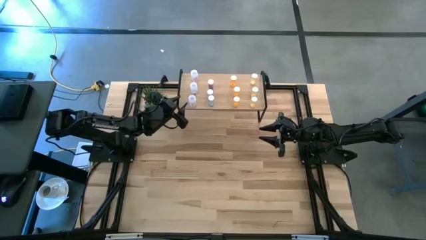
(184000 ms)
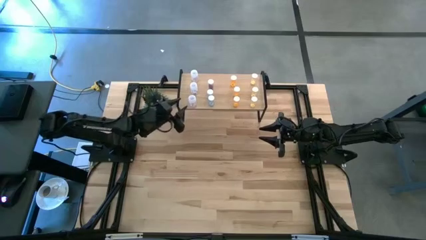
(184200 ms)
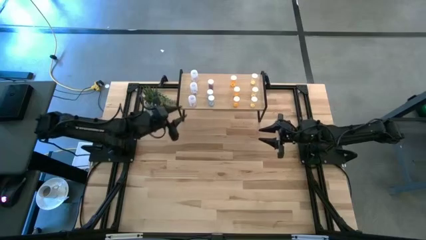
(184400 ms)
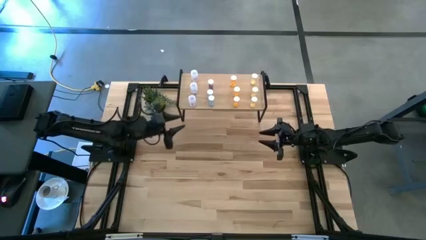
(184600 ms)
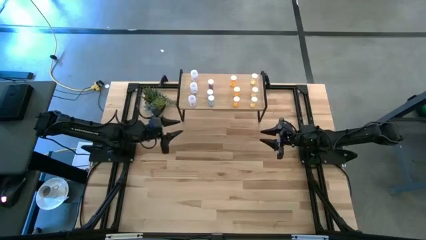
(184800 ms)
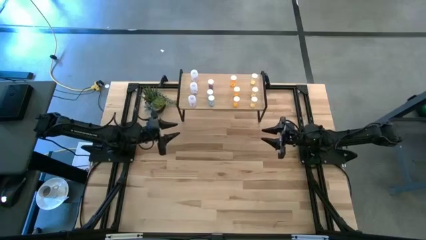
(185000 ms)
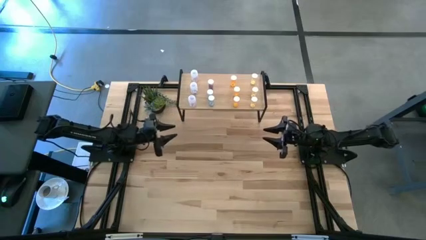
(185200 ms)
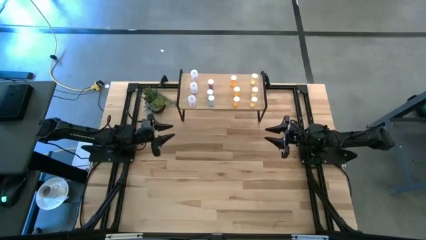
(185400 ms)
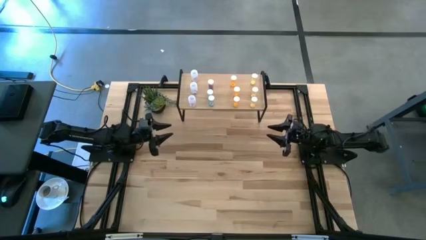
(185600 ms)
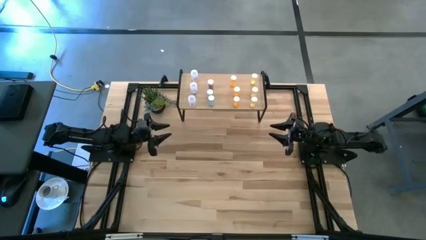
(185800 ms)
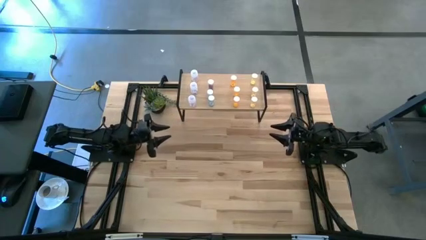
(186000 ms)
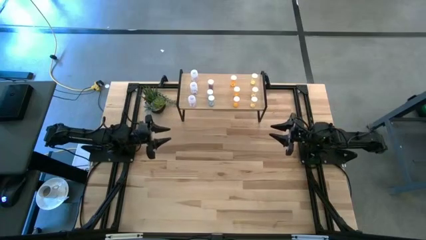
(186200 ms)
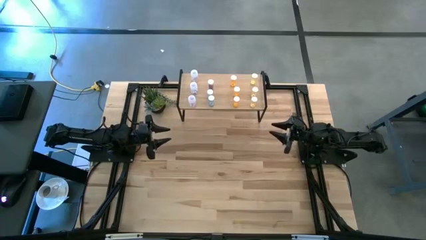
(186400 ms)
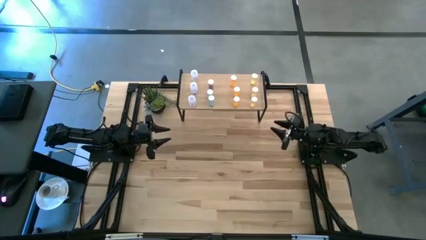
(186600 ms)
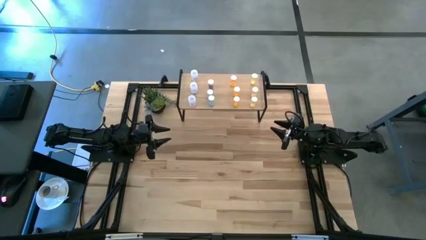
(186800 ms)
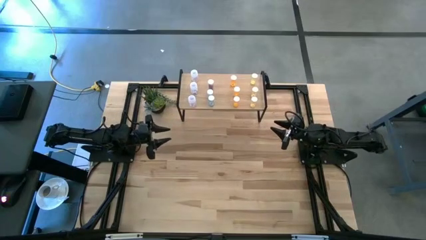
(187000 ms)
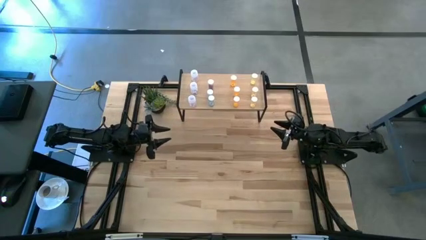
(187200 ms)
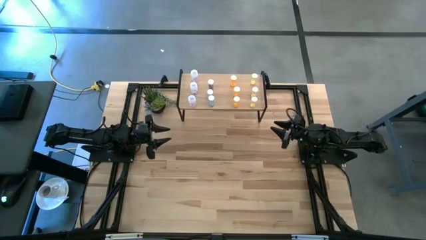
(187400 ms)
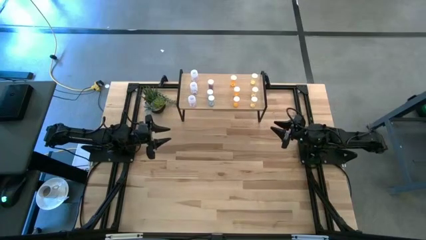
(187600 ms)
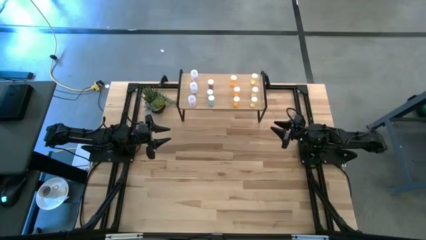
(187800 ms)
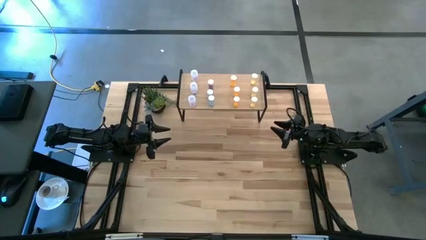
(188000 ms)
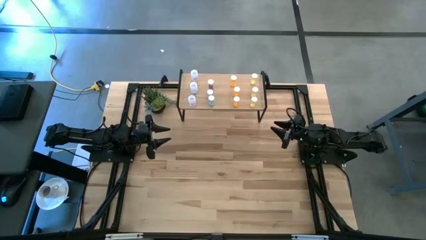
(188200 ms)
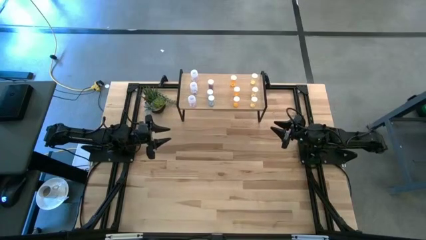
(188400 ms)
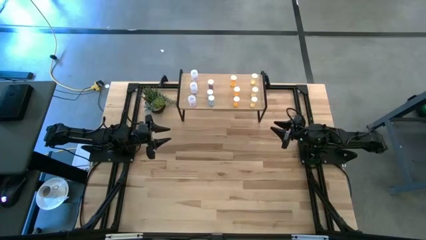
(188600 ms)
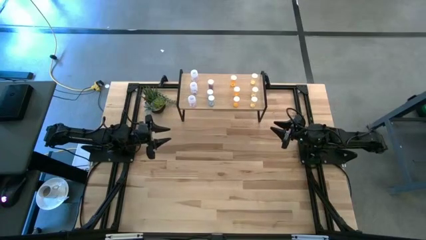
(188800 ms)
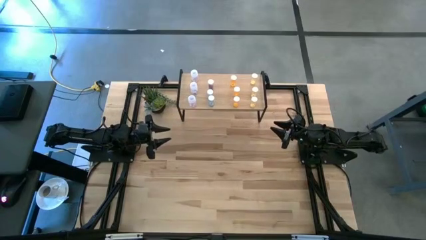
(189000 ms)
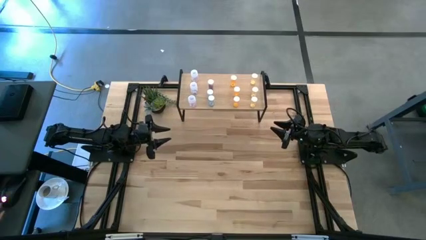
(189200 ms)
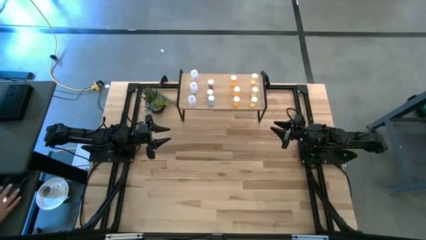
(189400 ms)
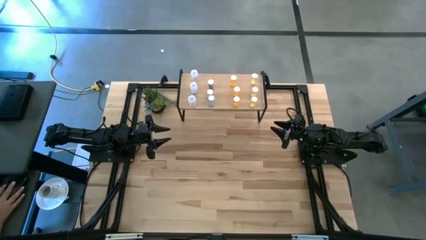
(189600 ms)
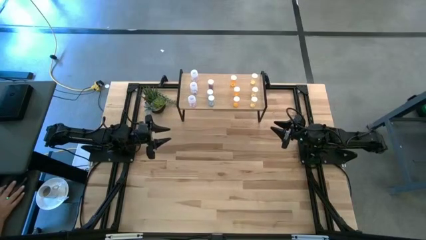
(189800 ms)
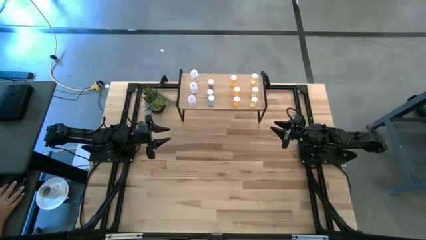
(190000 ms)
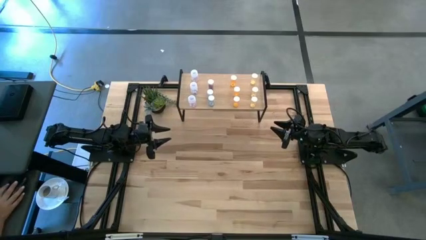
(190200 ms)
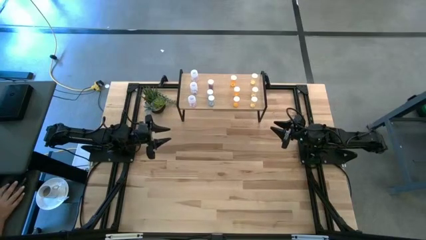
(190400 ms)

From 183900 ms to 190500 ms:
Task: Pick and place medicine bottles onto shelf by color
Return to Home Position

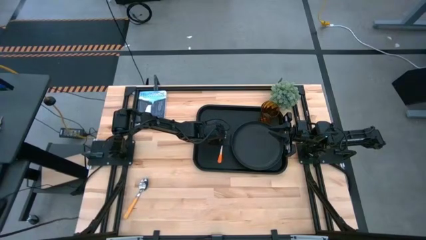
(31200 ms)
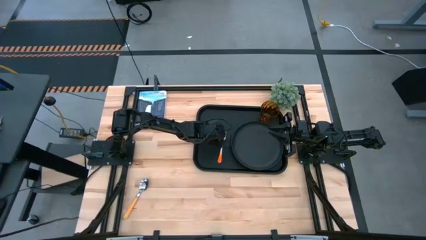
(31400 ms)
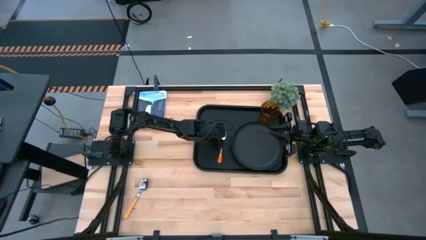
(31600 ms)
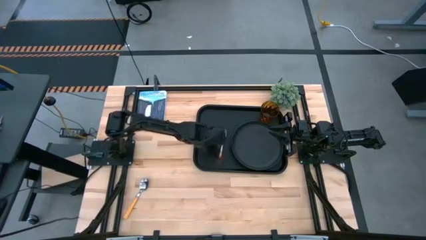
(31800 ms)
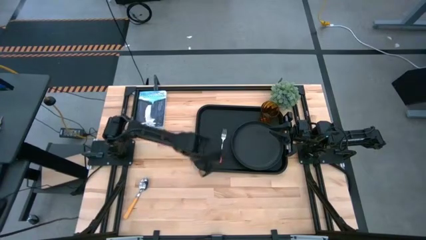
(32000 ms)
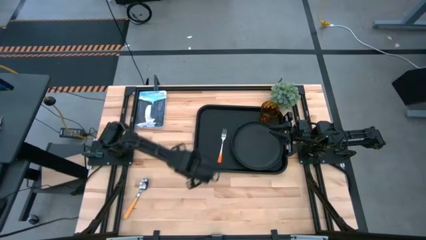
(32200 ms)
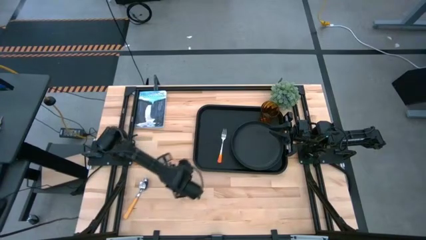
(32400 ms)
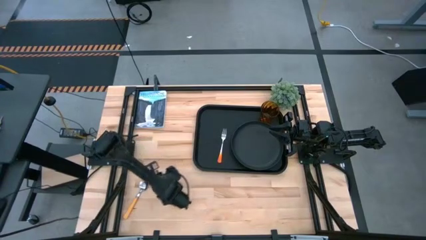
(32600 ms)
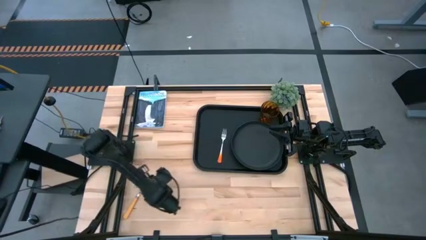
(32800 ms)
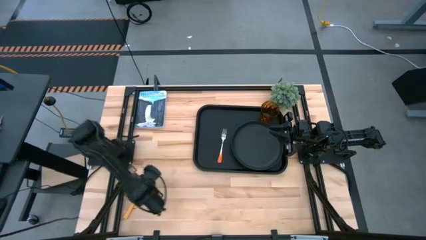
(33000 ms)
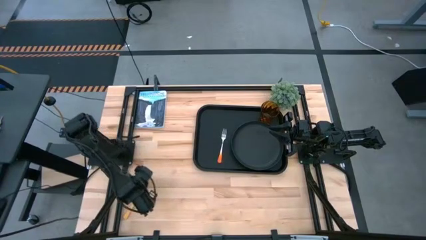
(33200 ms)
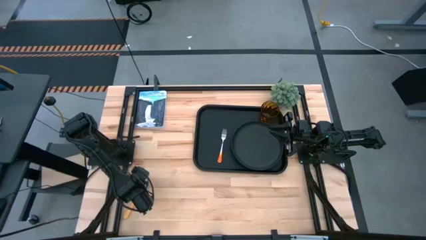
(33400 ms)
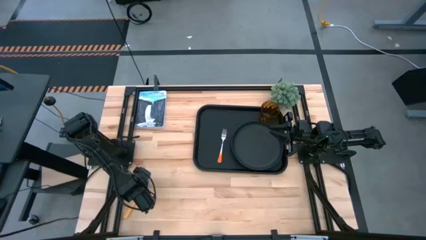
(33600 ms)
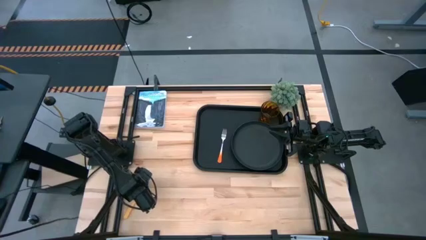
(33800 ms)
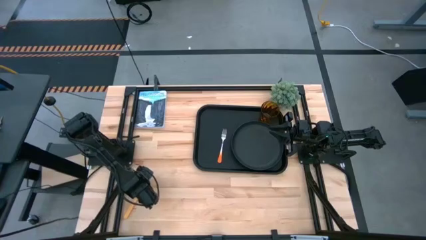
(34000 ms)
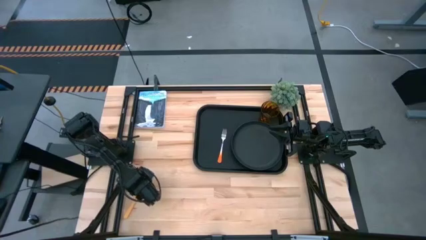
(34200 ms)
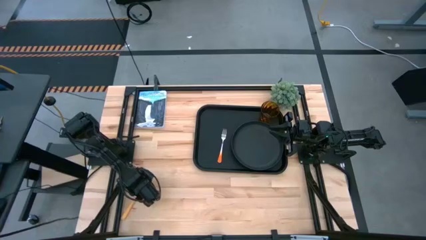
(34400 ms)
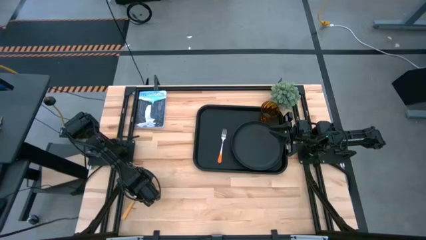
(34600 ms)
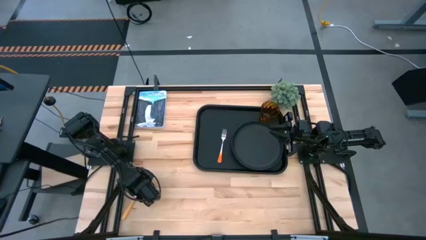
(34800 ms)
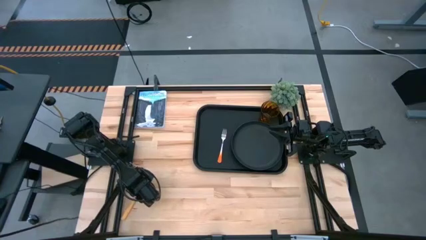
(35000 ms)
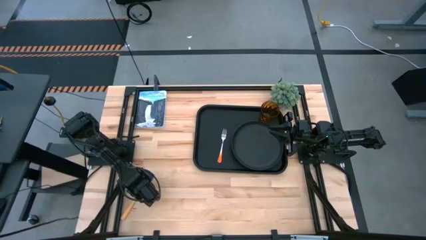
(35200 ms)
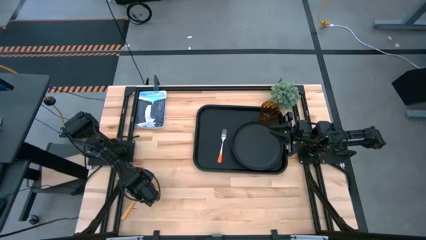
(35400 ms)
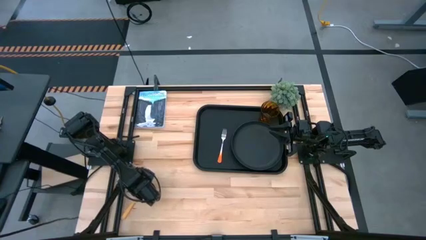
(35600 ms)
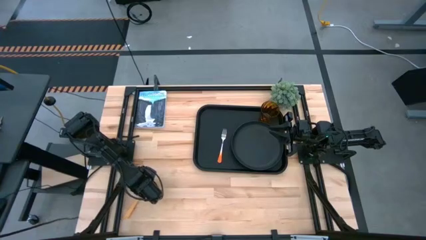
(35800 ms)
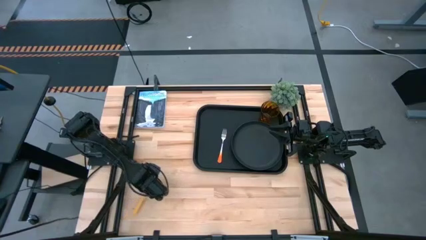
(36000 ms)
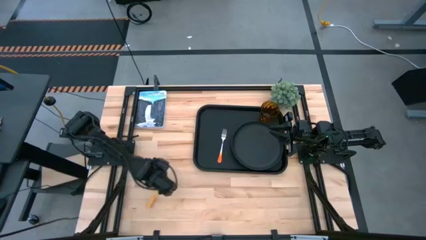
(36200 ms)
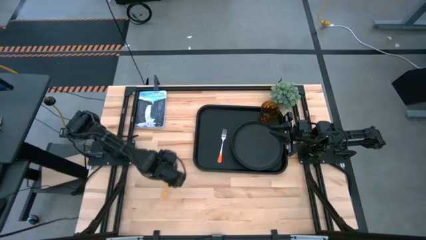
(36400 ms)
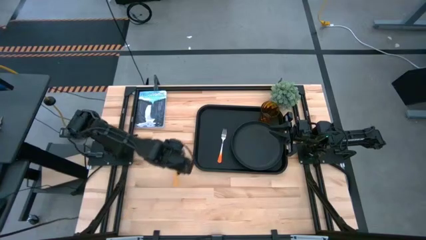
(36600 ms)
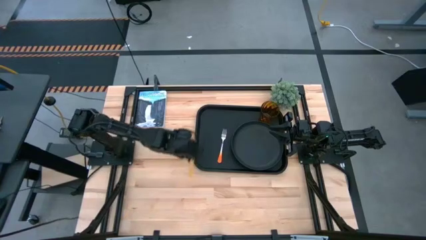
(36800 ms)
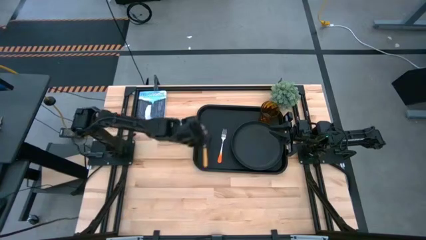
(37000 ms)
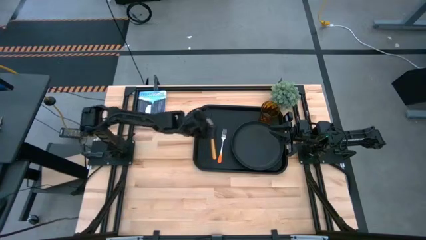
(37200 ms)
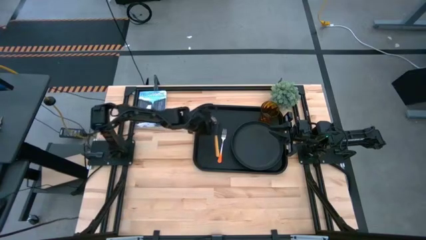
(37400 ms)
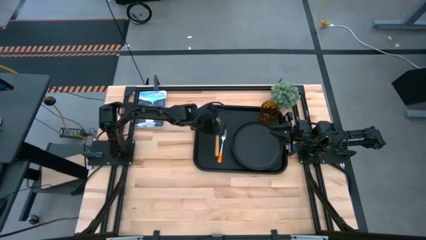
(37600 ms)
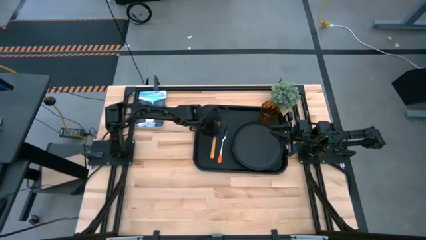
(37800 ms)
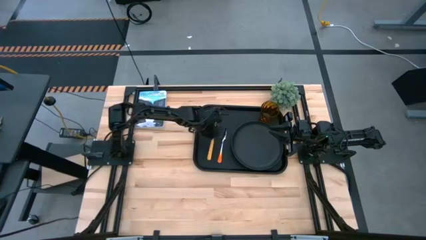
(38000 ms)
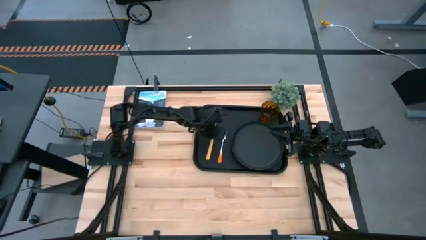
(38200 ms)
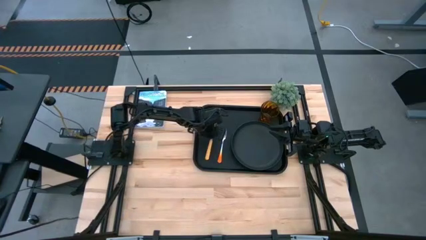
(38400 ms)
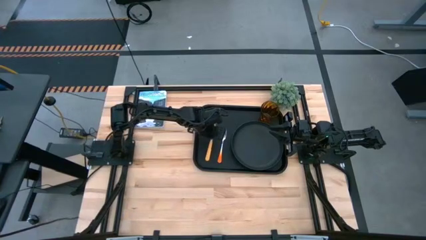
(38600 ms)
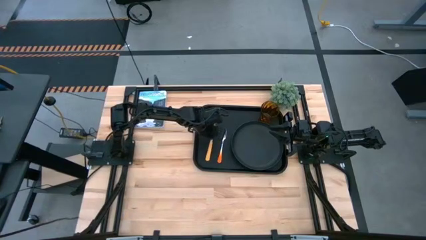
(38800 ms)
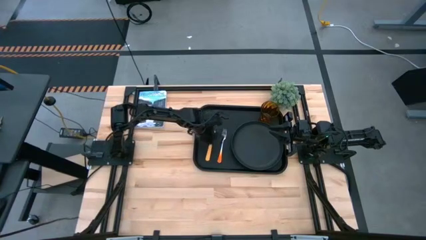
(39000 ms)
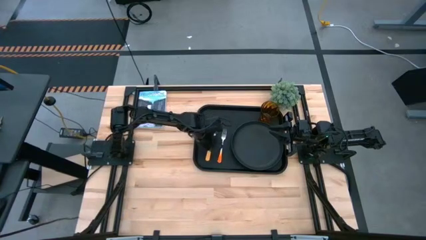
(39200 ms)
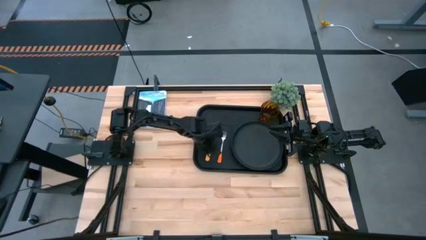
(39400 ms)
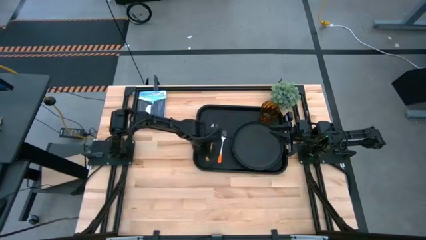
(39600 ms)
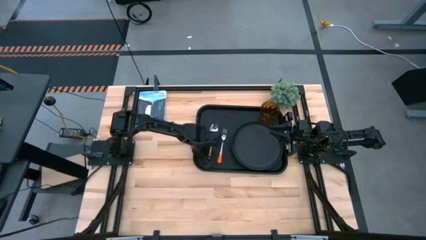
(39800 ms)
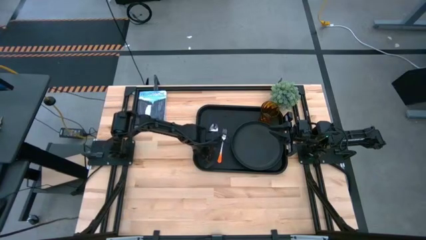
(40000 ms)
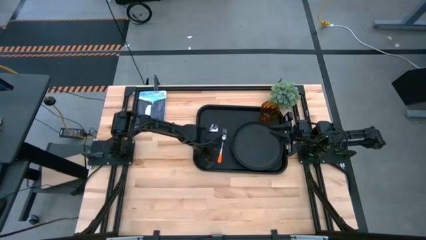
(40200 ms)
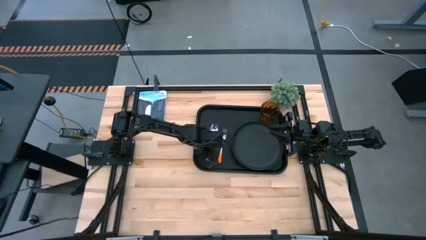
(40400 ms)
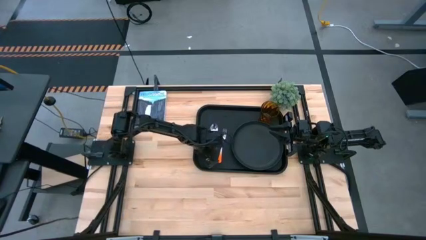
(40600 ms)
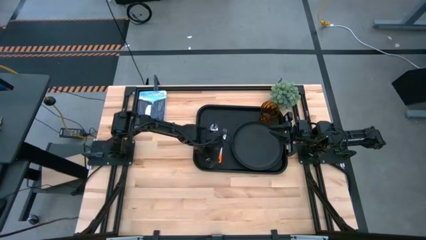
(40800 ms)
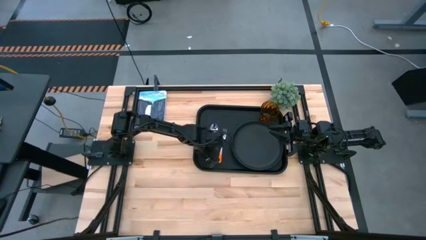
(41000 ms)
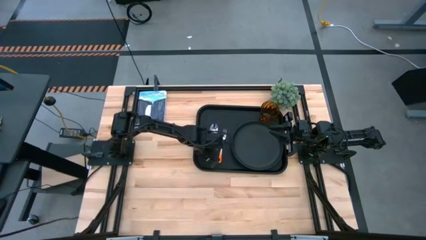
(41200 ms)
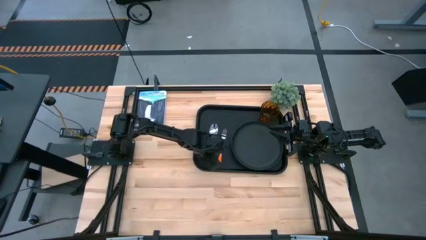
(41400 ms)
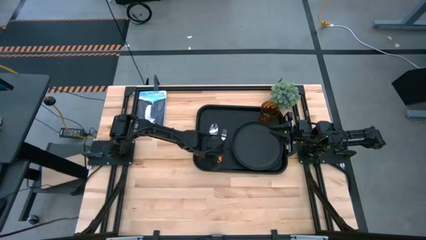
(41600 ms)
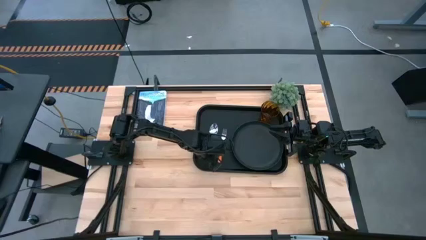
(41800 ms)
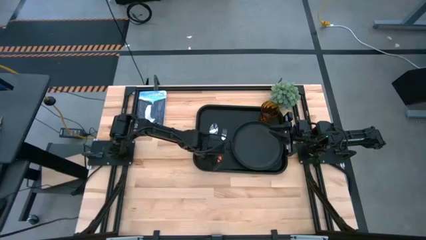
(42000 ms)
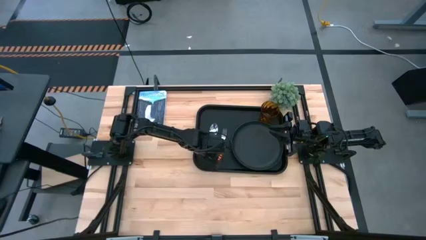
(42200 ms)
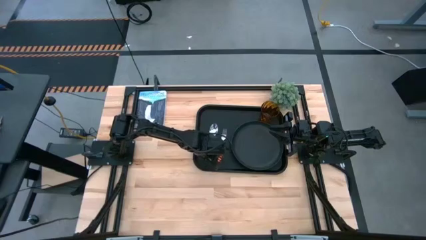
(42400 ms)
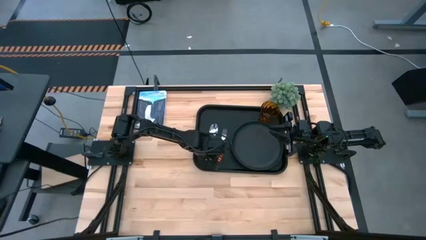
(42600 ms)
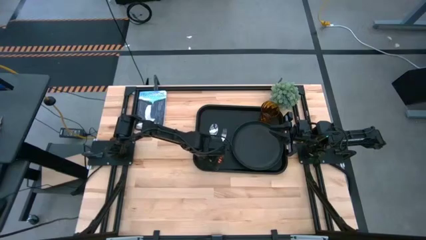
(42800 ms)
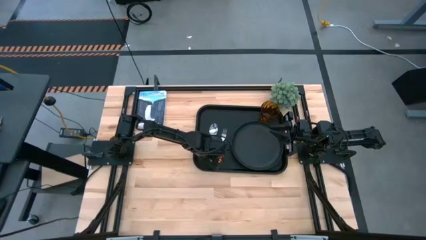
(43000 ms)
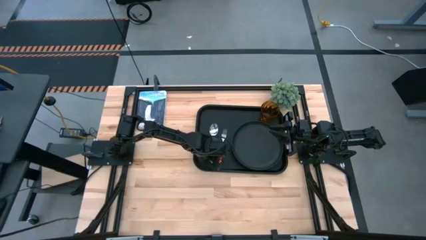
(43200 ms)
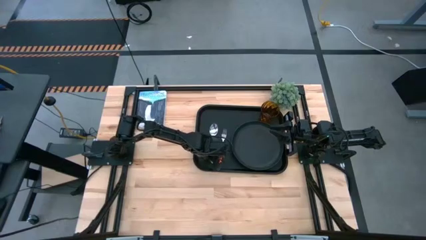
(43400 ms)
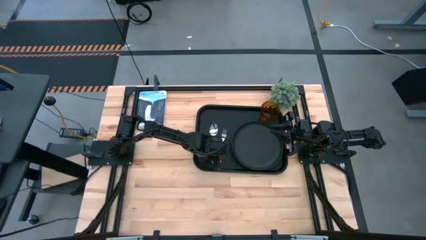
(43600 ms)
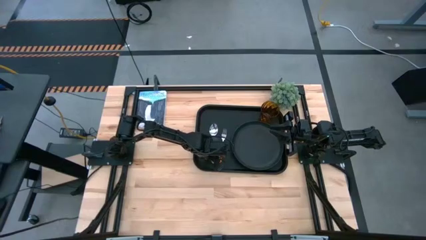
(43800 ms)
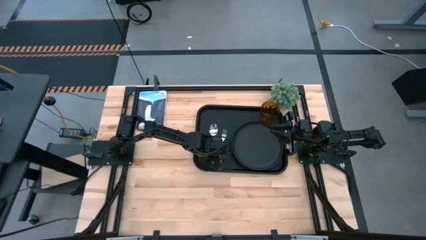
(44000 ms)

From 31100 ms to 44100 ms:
Task: Pick and place plate/cup/fork/spoon on tray
Put the yellow spoon on the black tray to the left of the orange fork
